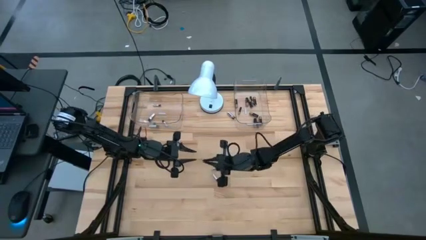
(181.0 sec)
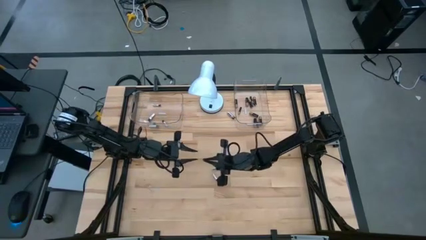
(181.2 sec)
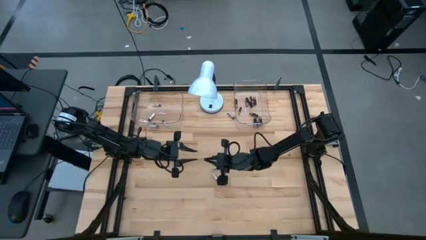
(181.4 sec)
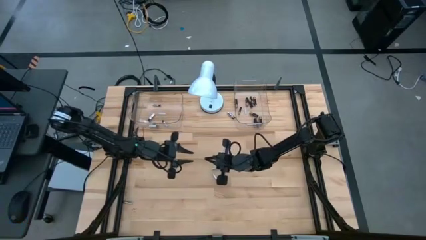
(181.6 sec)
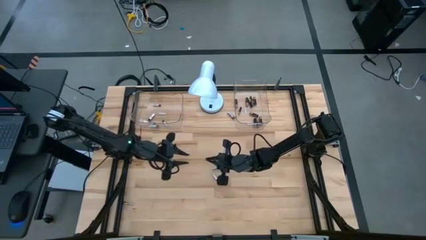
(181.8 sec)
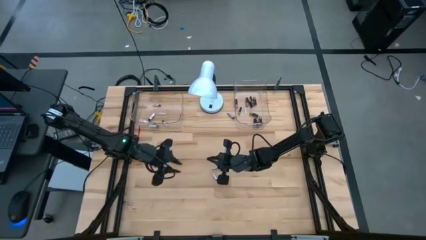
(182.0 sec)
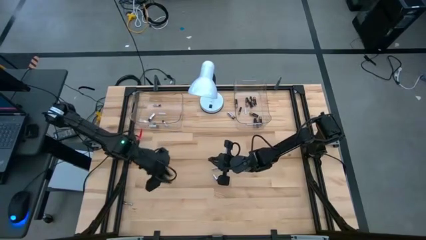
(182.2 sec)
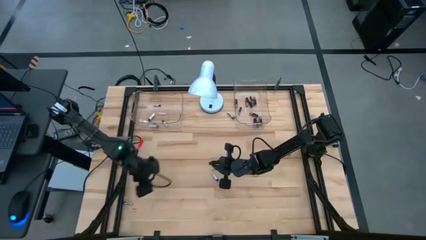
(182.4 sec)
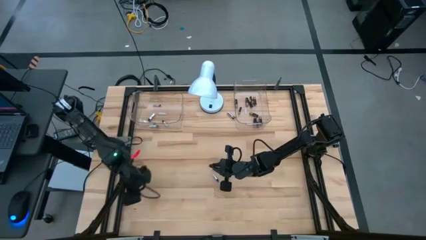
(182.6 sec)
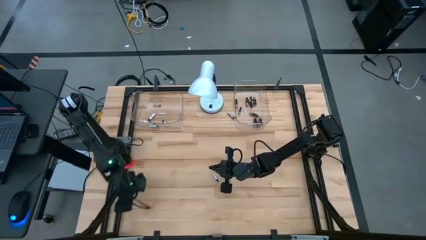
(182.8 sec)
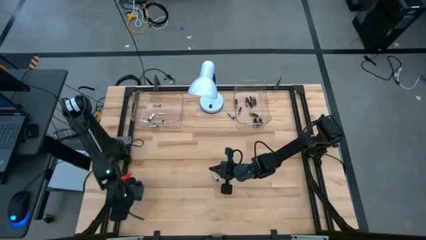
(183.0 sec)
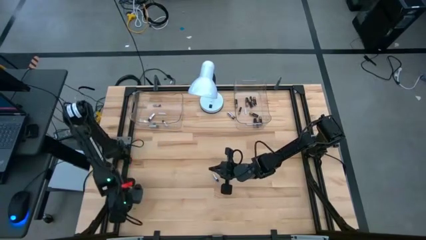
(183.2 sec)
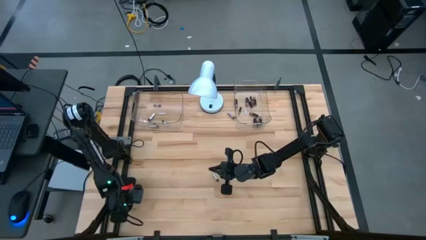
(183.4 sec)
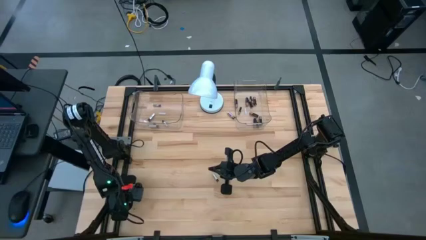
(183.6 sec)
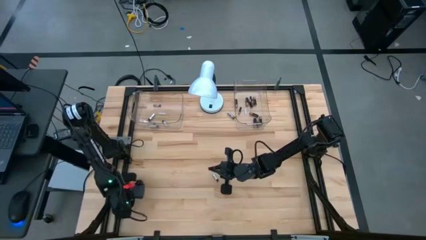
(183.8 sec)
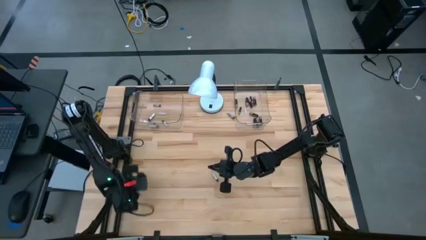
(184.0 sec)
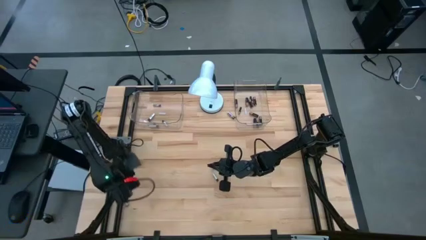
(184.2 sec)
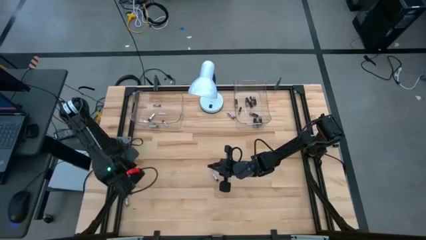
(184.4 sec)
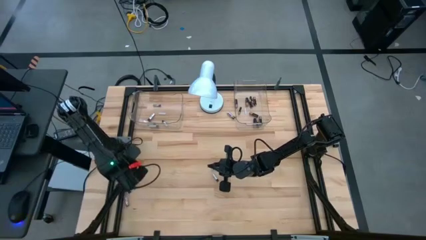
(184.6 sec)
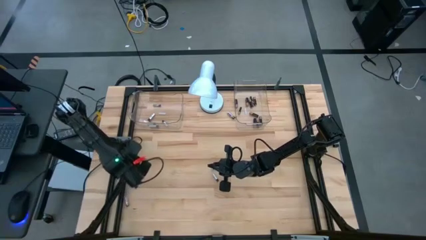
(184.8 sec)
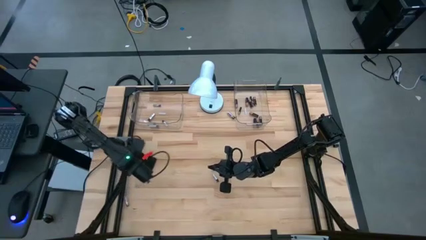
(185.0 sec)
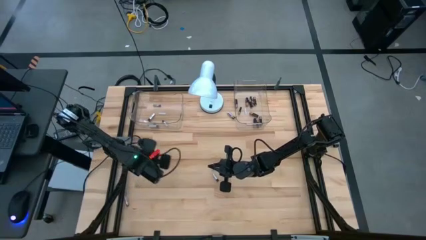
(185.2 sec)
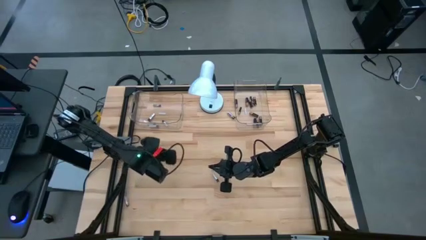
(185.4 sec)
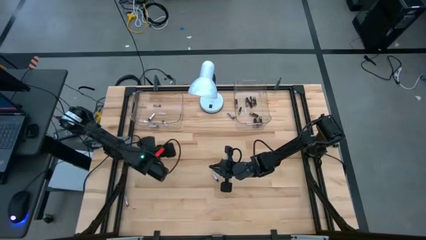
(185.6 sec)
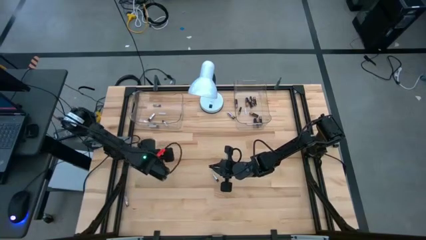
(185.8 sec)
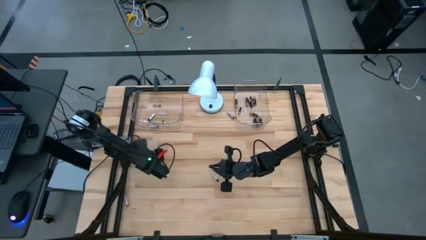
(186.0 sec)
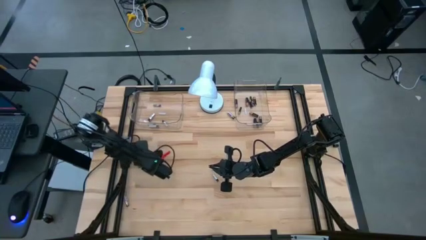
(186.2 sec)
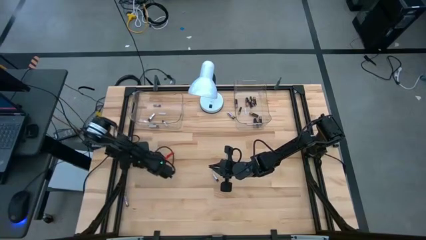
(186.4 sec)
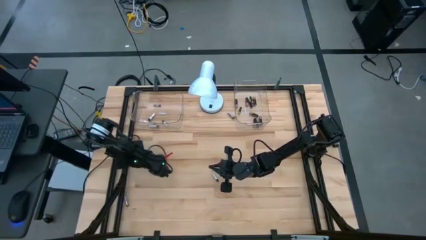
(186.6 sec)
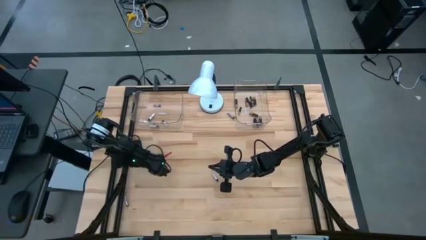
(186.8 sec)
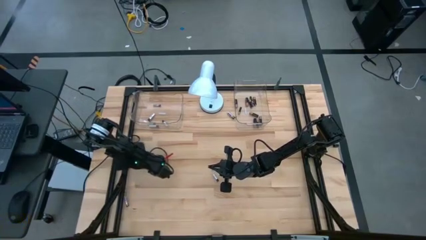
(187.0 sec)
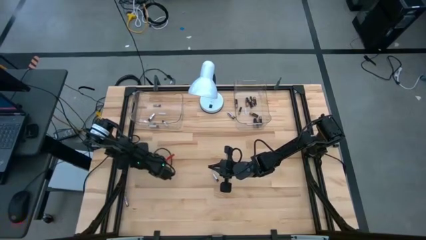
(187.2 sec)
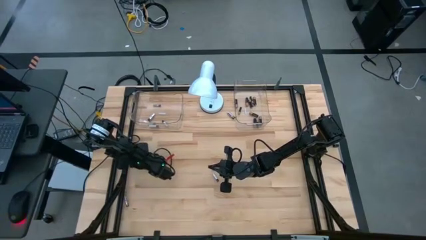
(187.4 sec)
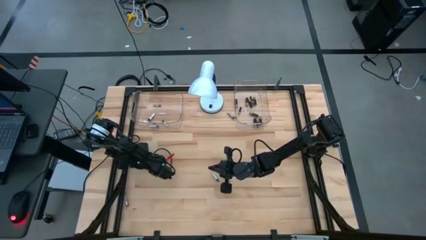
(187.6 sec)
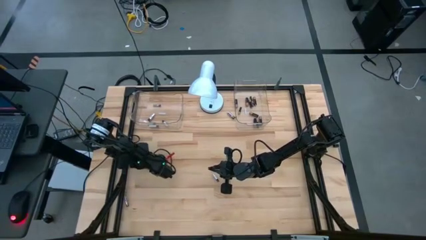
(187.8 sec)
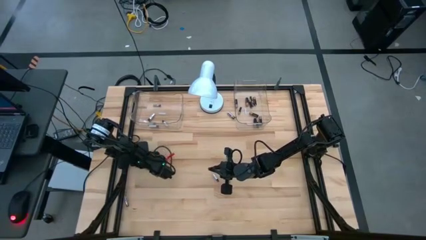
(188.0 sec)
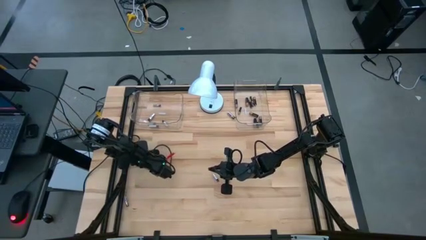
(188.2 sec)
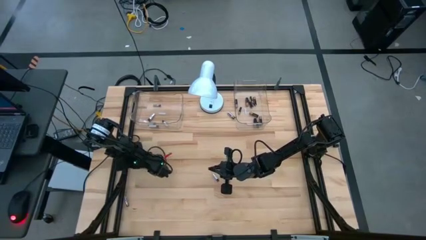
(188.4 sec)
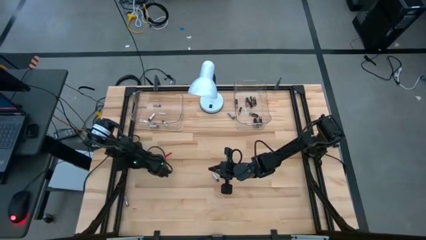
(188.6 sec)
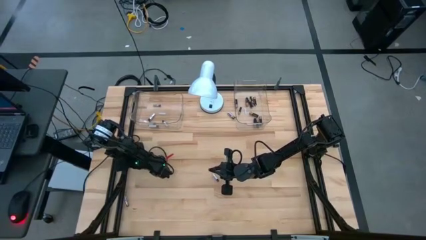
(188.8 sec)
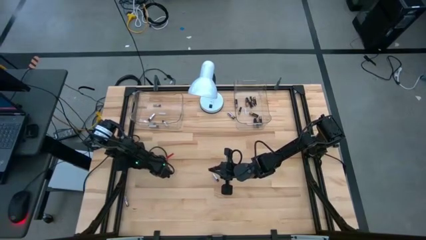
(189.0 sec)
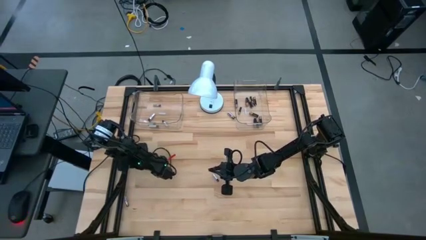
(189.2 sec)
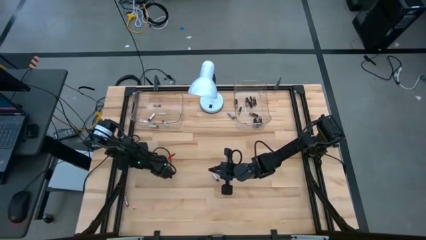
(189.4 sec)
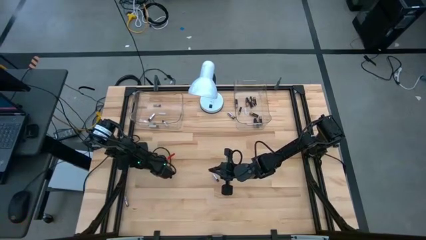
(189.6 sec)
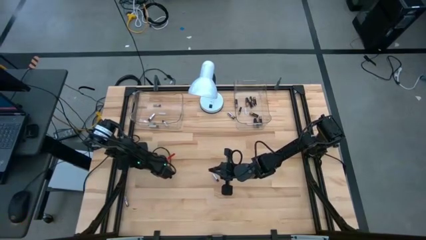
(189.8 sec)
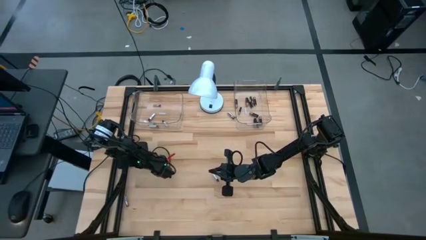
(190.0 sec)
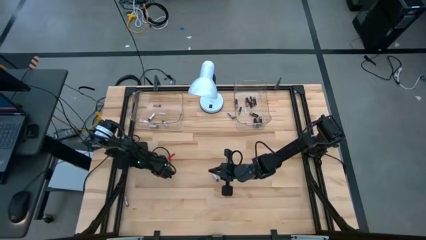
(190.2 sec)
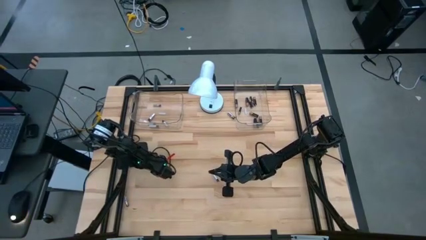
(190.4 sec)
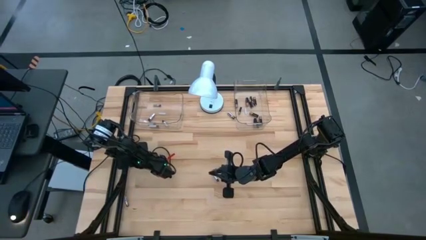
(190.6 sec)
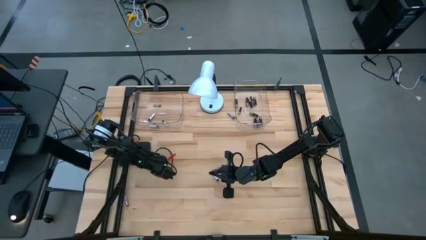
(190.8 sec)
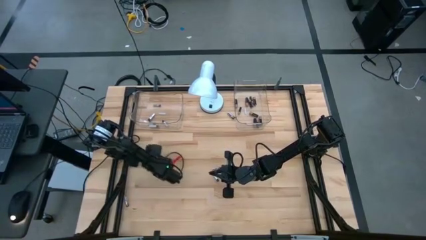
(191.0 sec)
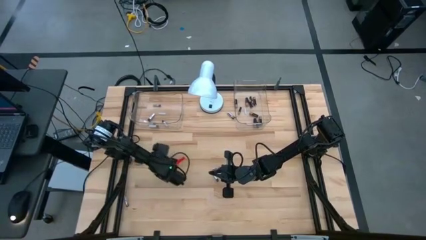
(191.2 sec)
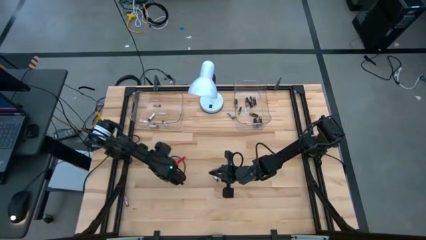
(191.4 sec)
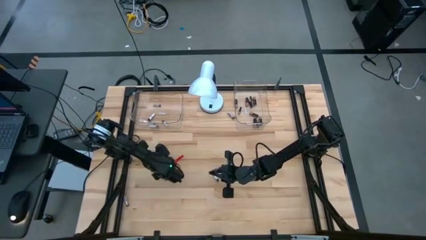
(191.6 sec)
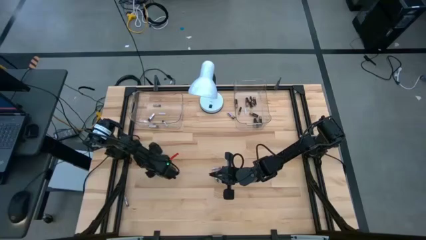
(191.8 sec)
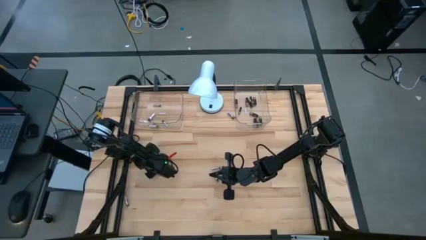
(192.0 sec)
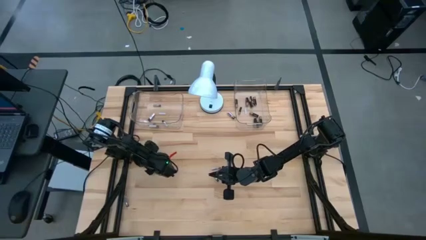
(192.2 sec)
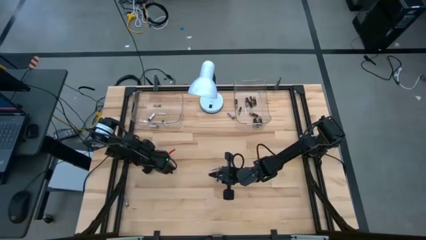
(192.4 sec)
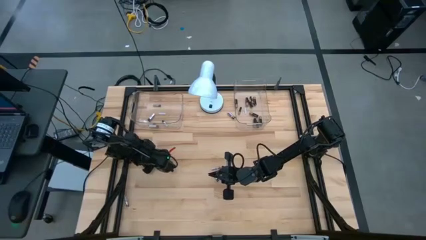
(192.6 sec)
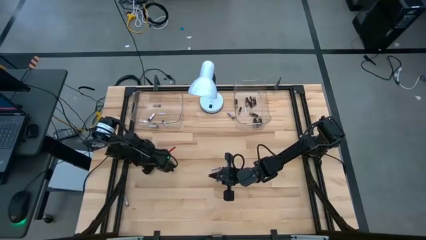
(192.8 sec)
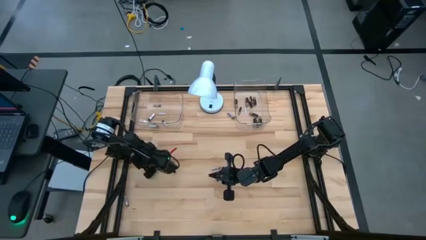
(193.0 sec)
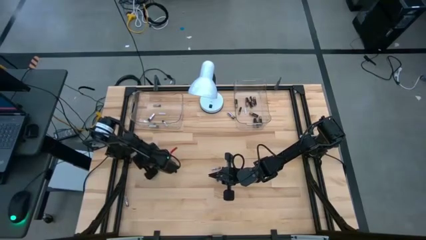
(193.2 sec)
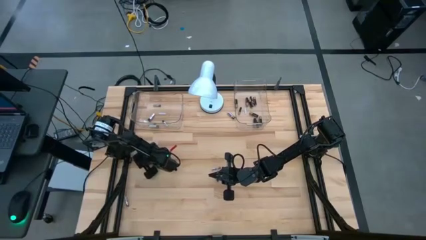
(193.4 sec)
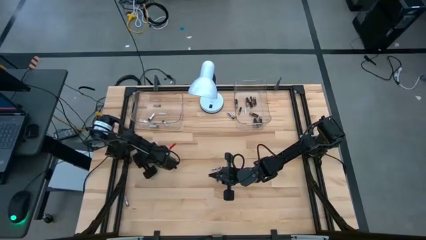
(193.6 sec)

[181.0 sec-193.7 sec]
Task: Sort batteries
Put the black battery in the transparent bin

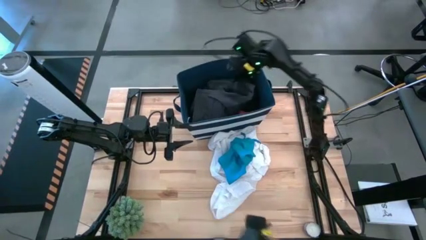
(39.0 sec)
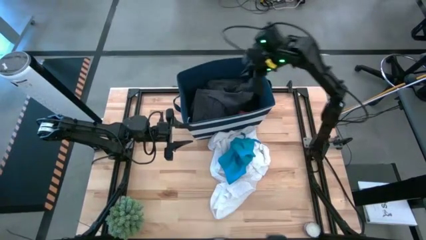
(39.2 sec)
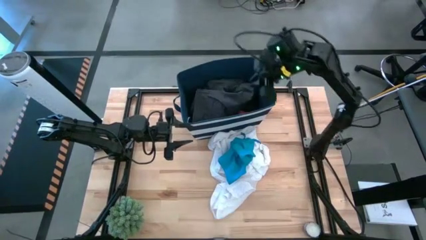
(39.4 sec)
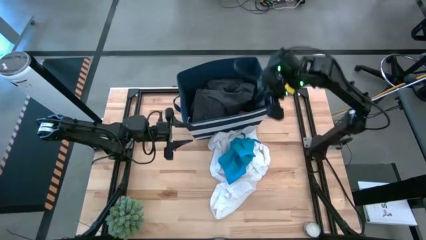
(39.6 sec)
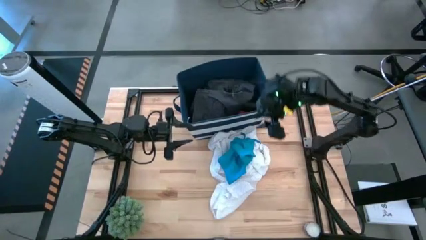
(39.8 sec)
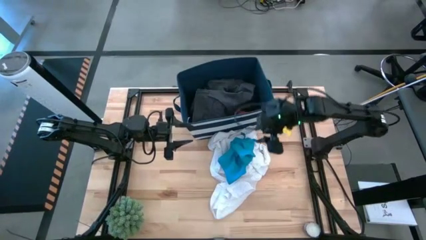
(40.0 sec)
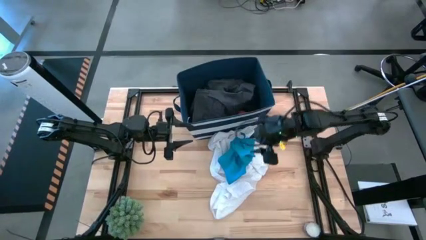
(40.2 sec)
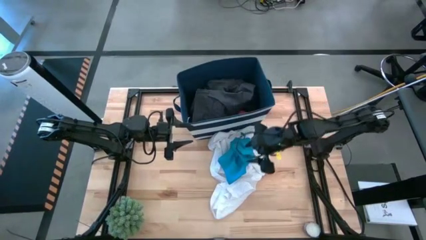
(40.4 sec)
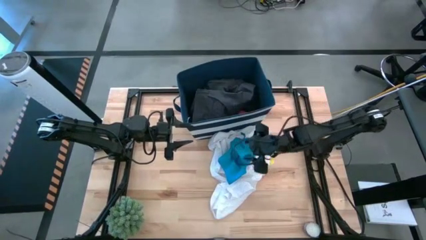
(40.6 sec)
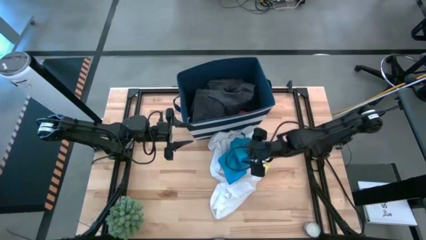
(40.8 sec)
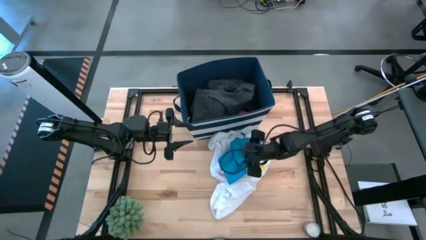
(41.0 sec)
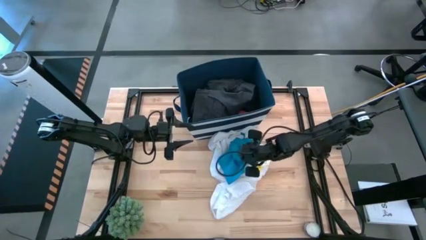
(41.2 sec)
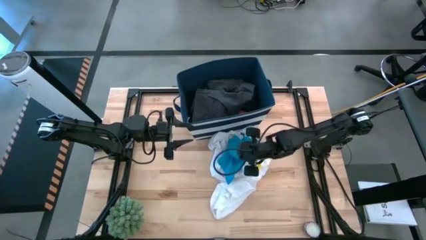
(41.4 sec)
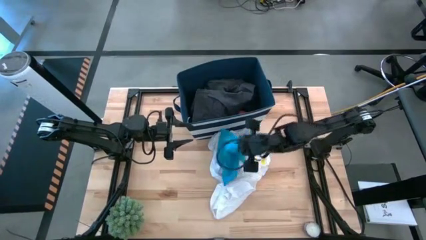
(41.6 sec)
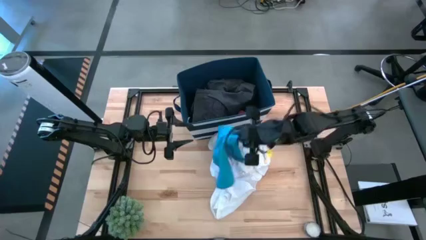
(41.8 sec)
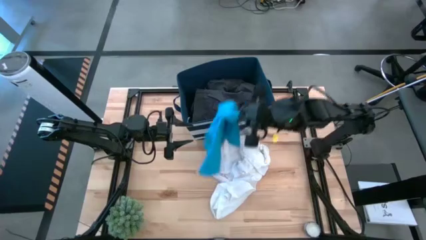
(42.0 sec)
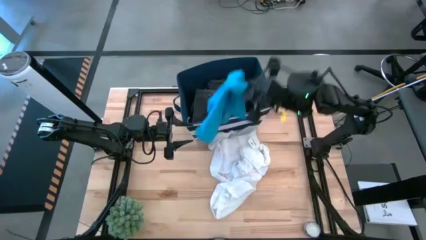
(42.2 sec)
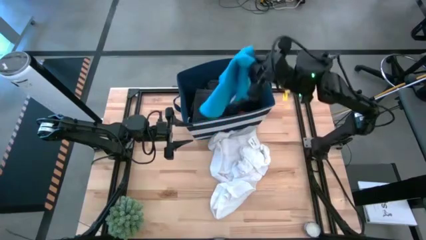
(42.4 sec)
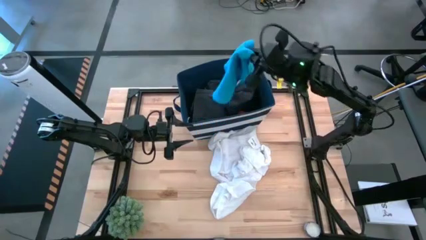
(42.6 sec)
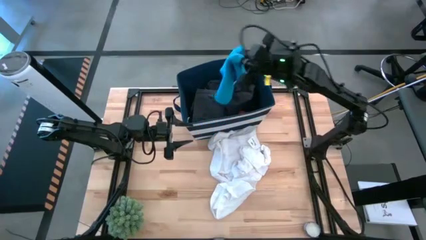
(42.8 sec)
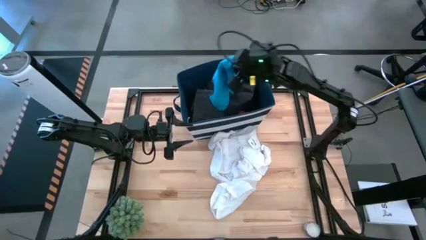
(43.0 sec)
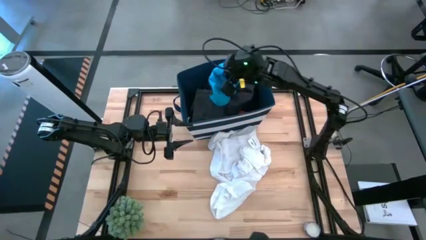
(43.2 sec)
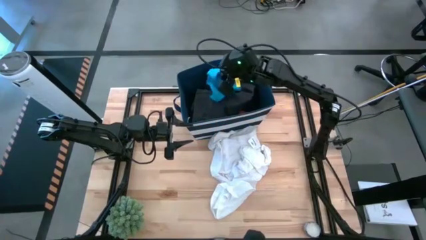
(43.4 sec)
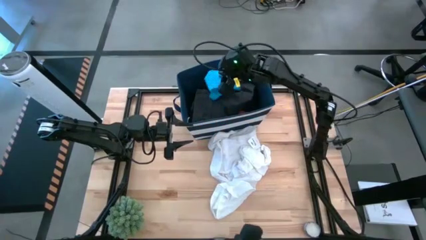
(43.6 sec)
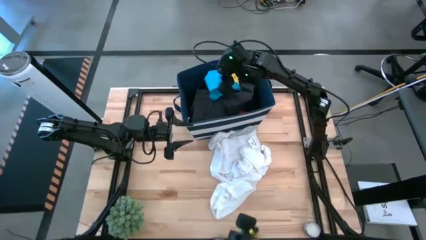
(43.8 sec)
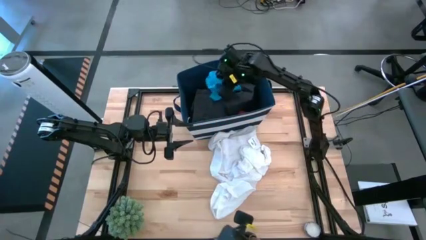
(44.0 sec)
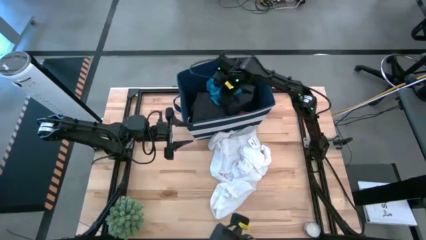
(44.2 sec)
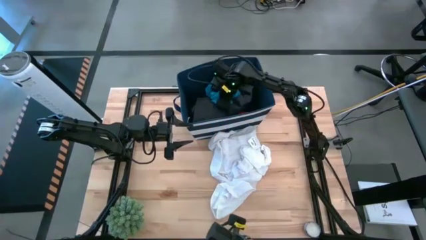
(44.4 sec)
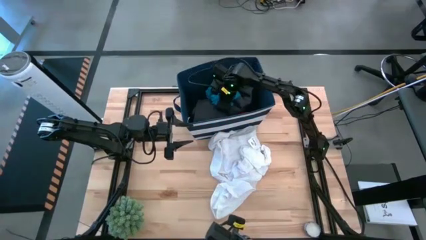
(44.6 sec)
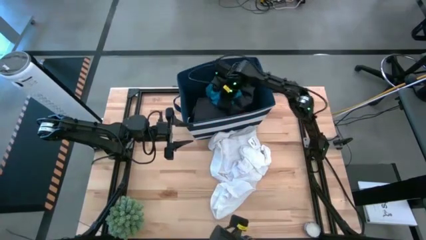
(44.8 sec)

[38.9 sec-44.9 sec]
Task: Sort clothes
Put the blue shorts into the laundry bin
